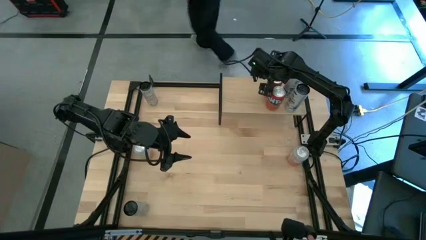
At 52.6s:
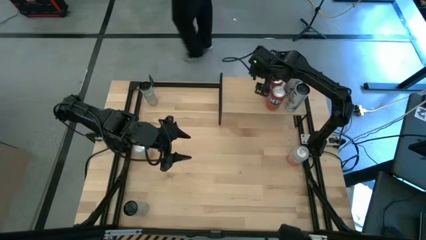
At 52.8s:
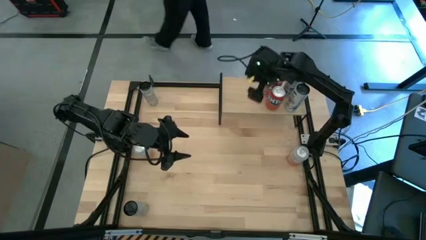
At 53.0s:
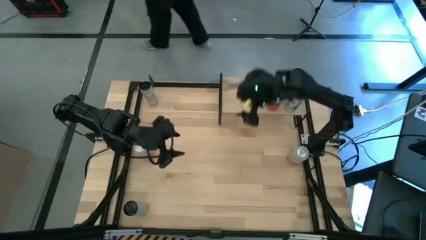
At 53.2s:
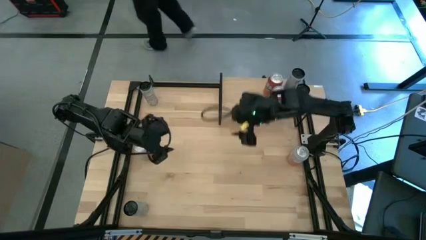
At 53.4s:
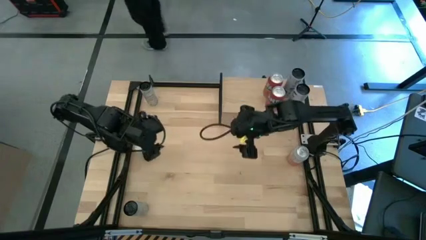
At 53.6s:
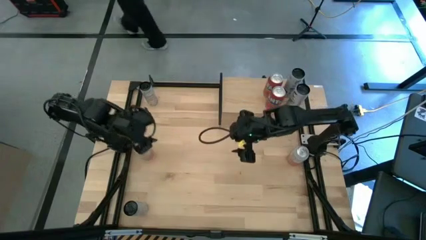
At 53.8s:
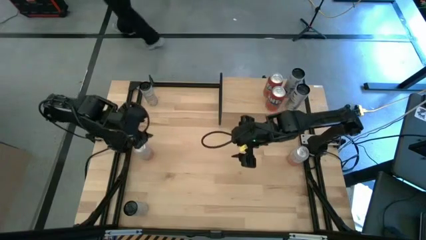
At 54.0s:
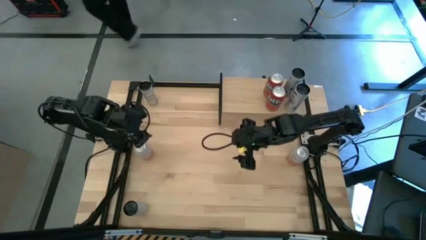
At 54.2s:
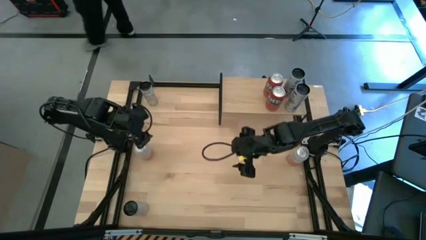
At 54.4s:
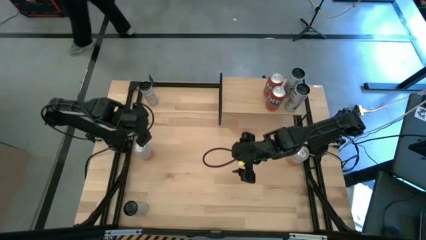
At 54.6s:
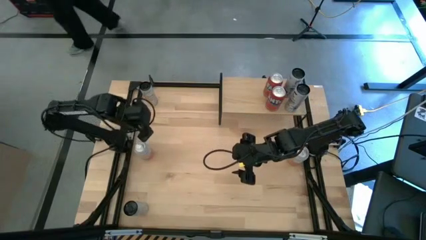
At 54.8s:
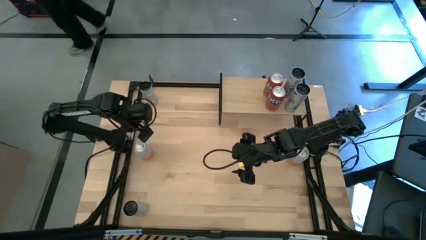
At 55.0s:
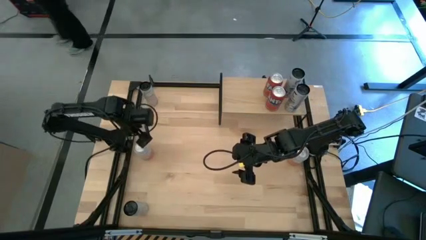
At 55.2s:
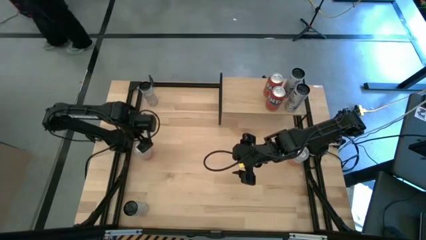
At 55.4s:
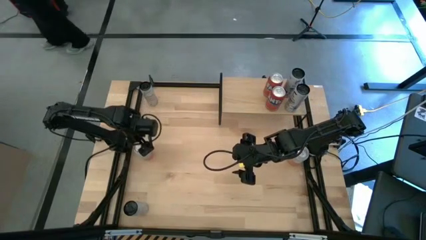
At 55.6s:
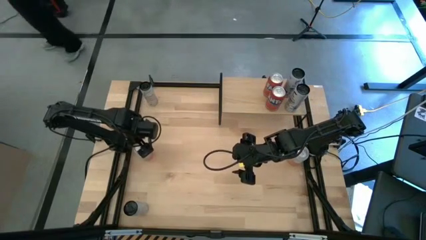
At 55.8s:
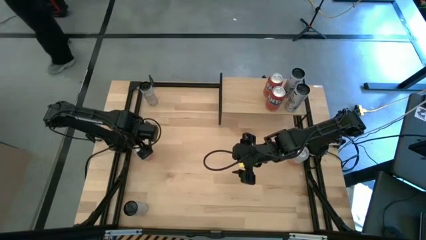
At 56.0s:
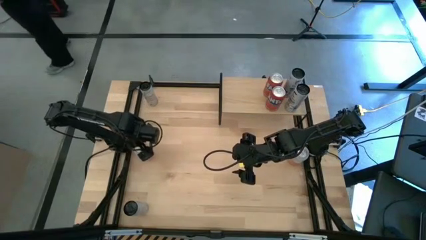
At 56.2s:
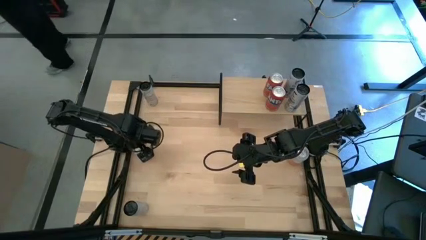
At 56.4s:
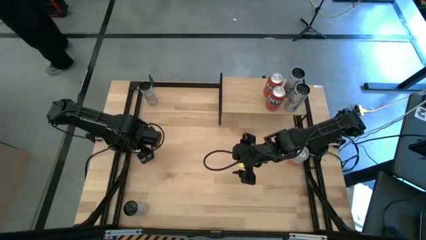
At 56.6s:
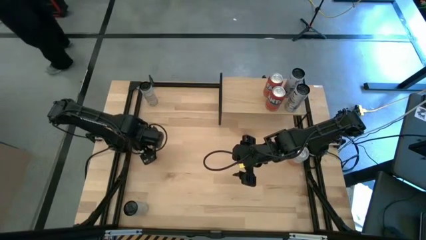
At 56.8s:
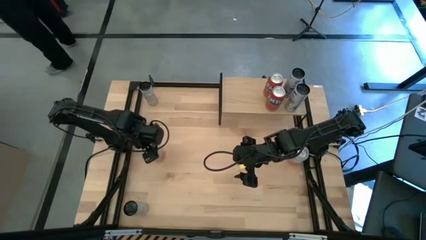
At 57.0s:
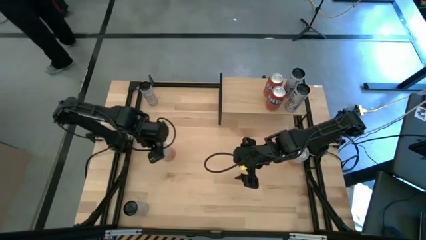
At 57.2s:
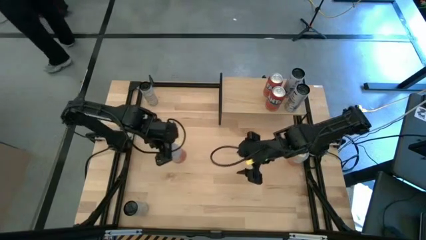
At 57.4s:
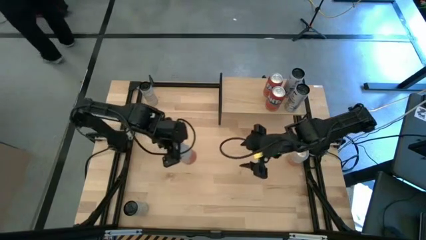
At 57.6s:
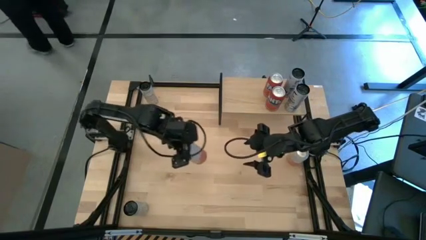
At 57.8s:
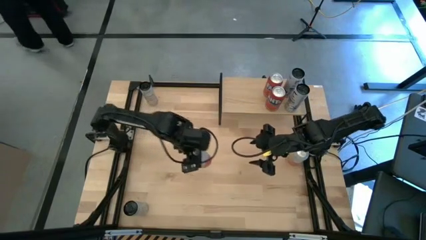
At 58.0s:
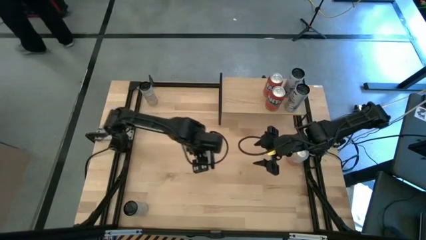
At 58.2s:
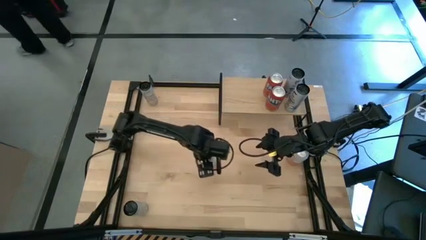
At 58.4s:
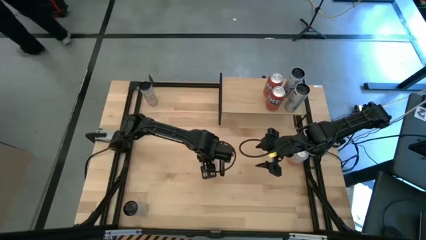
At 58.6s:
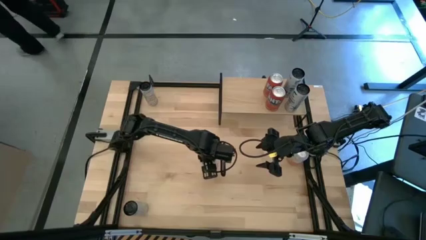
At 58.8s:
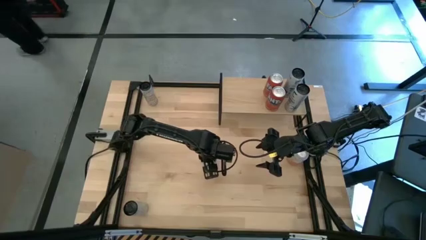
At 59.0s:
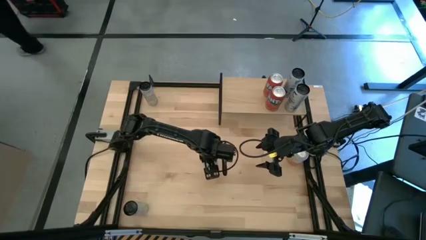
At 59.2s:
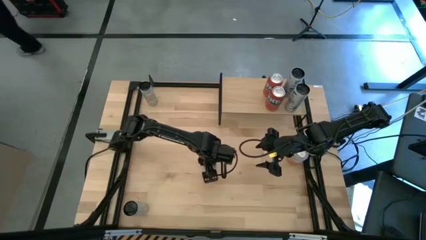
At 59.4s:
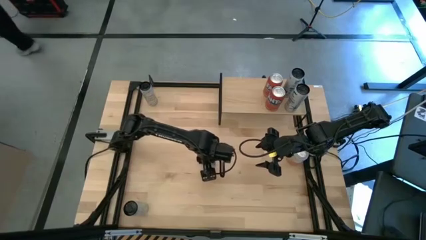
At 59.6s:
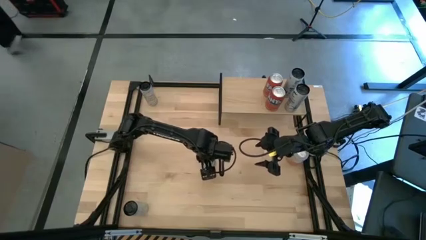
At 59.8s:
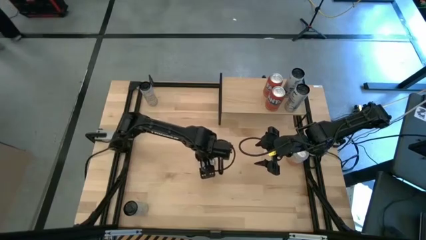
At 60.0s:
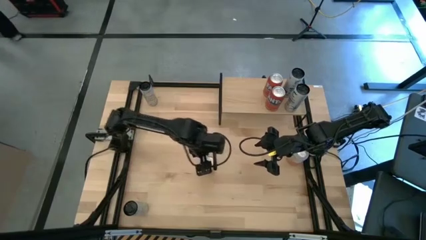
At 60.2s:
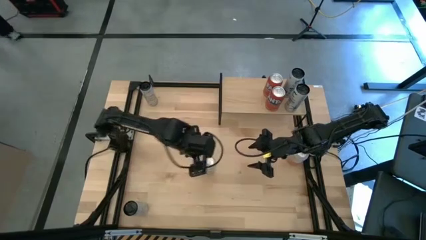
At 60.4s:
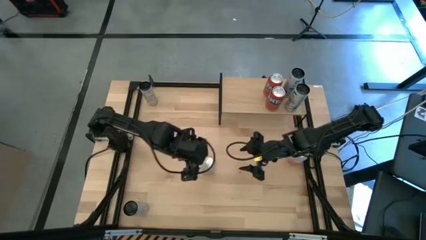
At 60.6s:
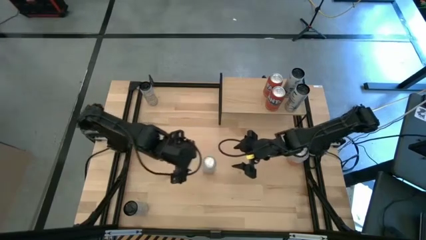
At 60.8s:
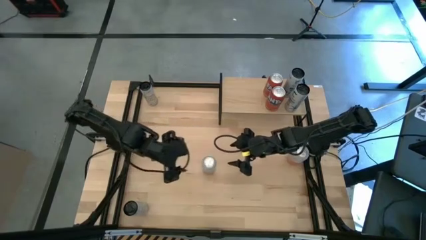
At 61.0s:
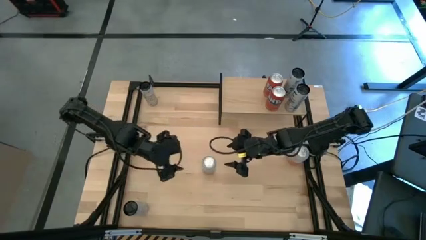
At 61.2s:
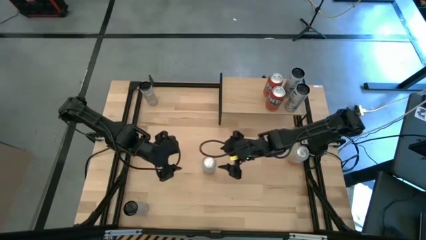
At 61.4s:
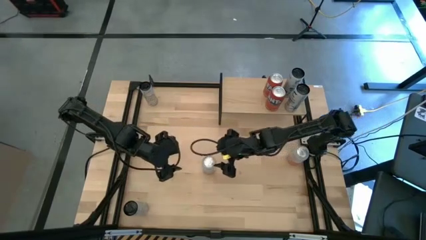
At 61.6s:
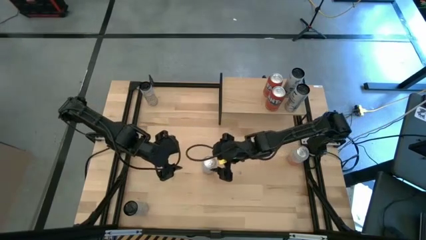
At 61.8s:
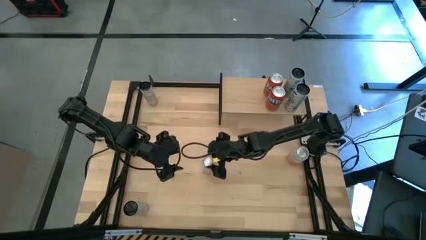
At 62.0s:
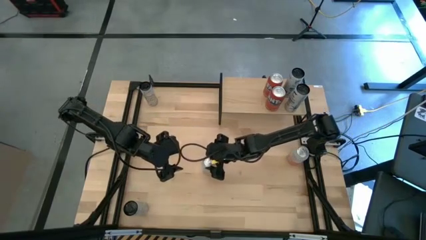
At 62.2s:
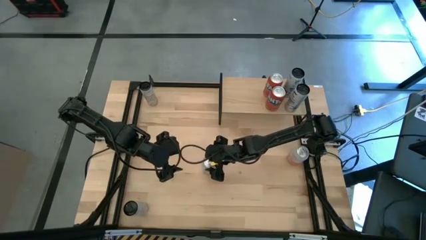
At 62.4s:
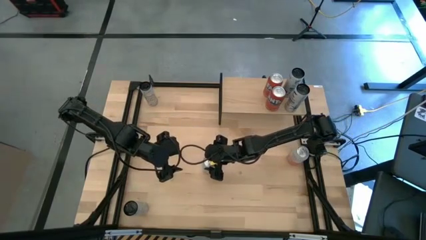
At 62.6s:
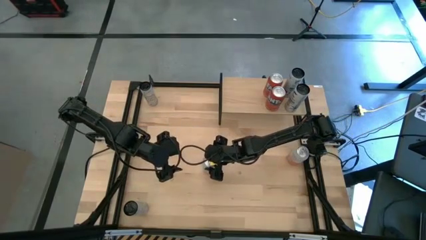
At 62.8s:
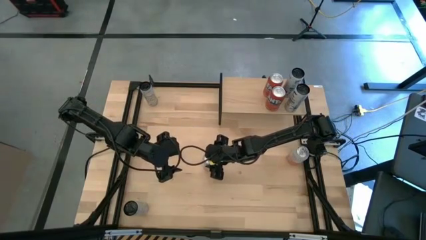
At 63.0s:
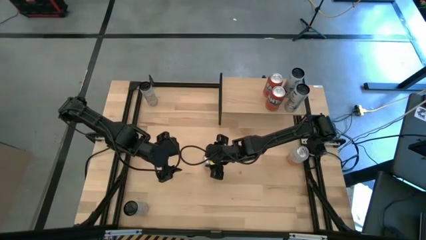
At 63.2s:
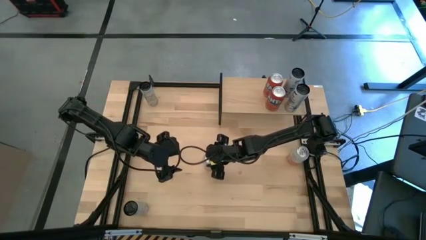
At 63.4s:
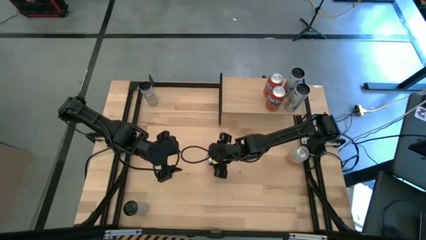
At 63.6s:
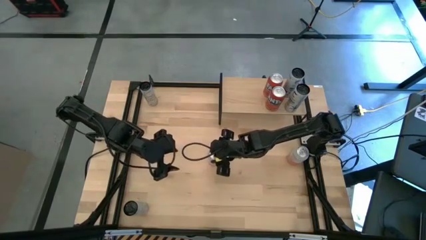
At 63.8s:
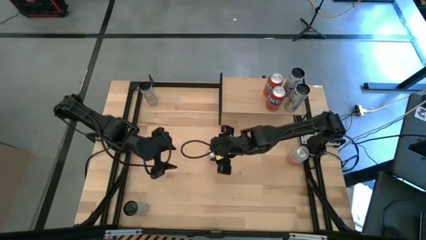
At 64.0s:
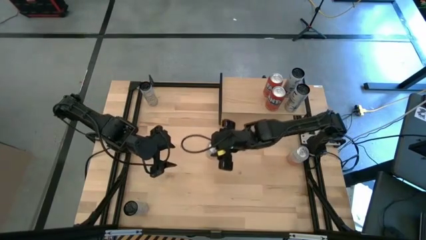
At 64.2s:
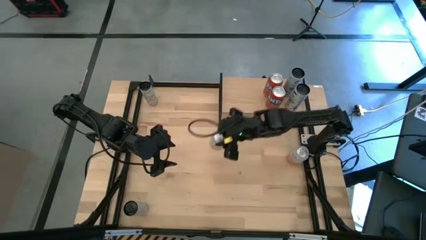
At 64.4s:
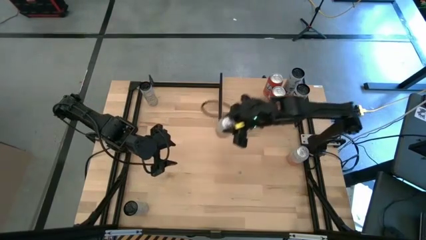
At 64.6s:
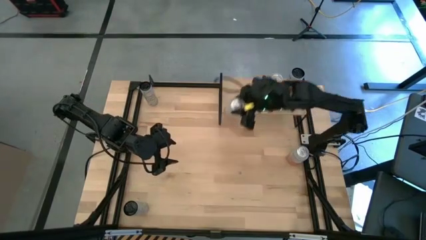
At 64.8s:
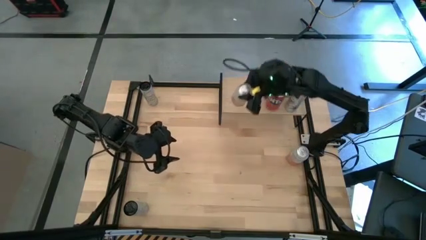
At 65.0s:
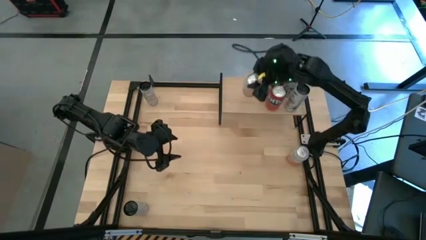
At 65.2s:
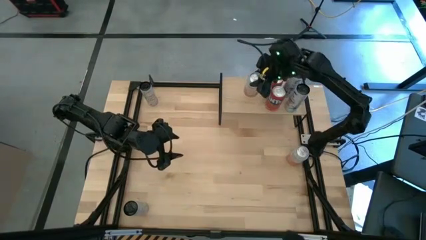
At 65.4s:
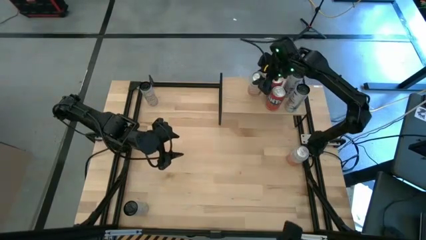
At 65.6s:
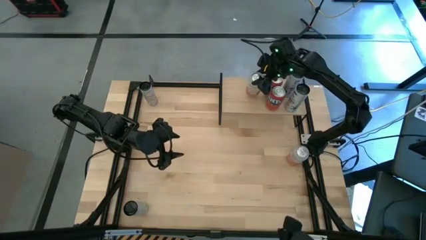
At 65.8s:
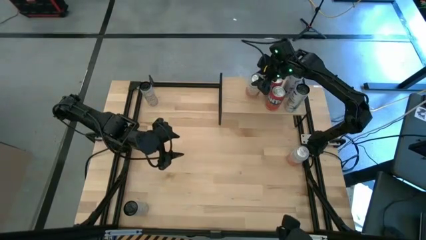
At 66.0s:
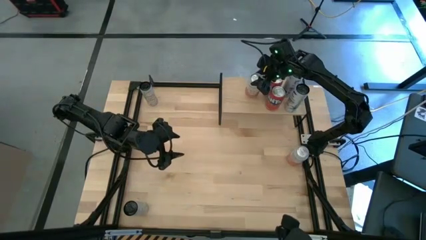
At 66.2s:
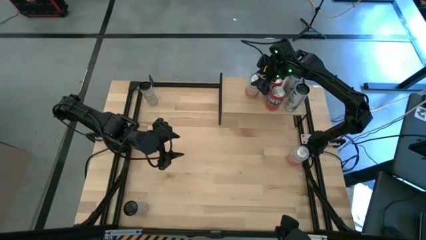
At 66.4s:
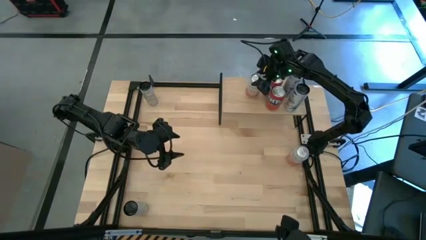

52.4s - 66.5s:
Task: Place canned beverage on shelf
Put the left white pink soda can on the shelf

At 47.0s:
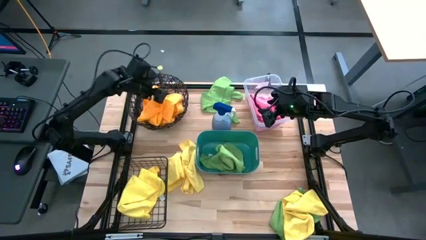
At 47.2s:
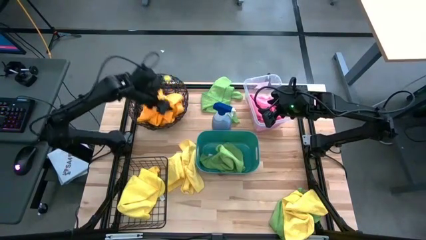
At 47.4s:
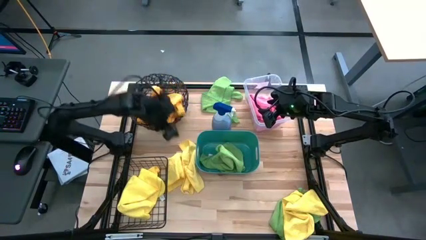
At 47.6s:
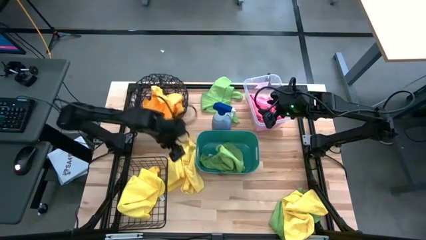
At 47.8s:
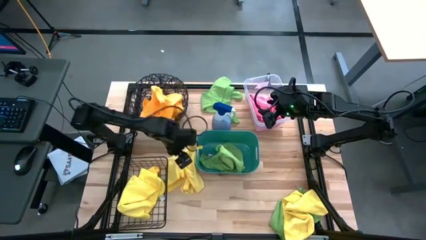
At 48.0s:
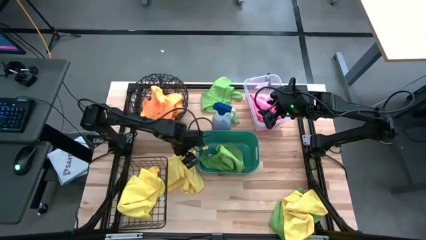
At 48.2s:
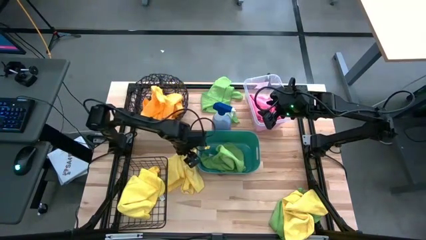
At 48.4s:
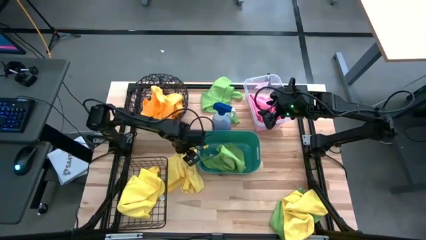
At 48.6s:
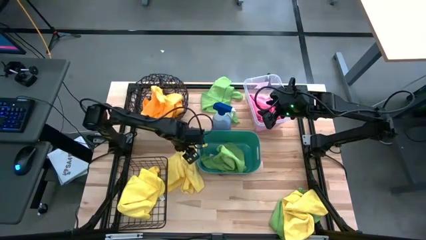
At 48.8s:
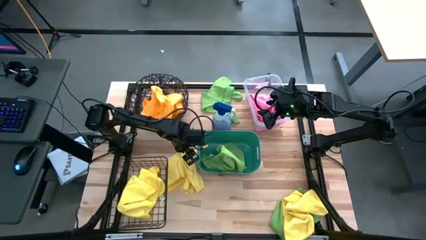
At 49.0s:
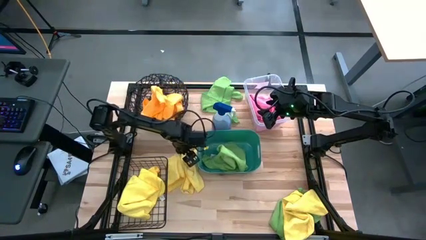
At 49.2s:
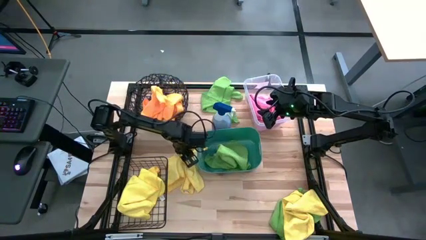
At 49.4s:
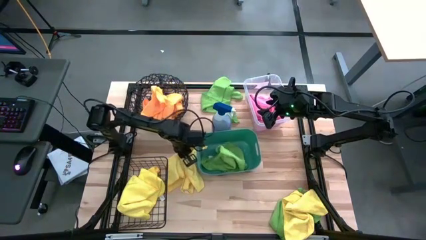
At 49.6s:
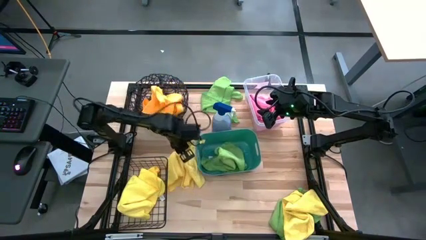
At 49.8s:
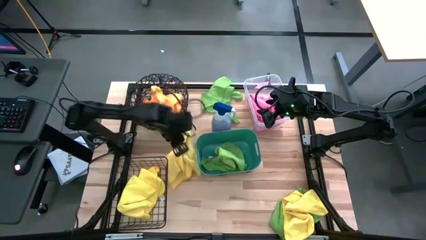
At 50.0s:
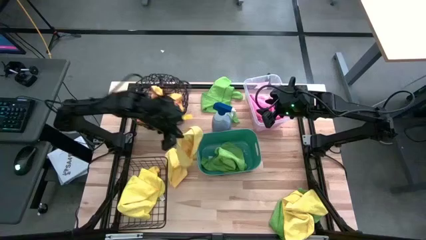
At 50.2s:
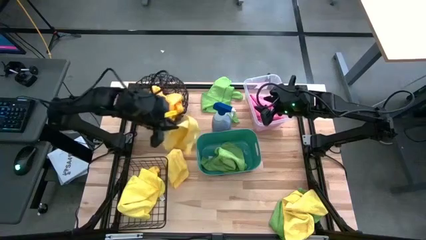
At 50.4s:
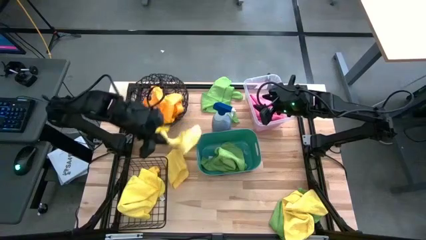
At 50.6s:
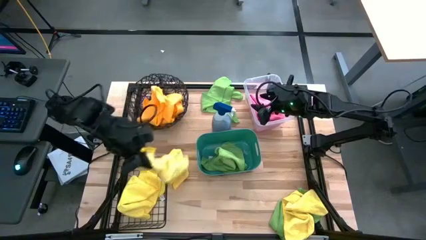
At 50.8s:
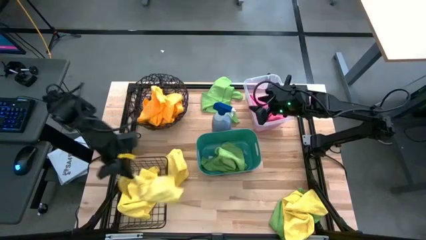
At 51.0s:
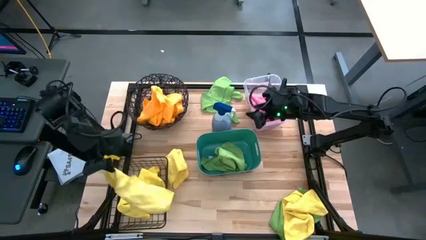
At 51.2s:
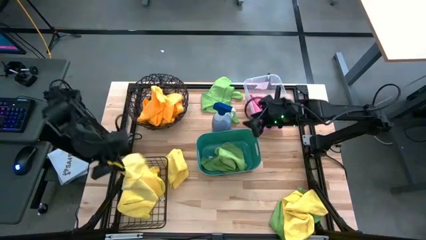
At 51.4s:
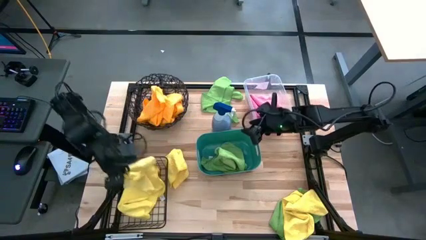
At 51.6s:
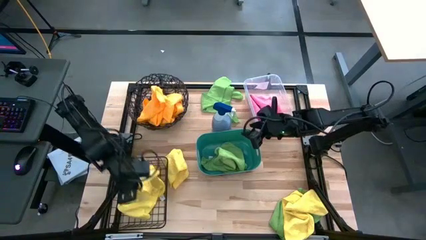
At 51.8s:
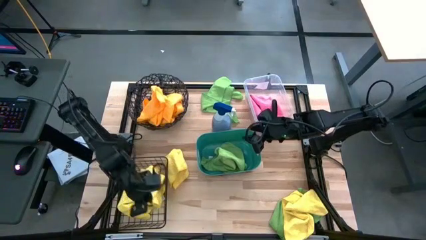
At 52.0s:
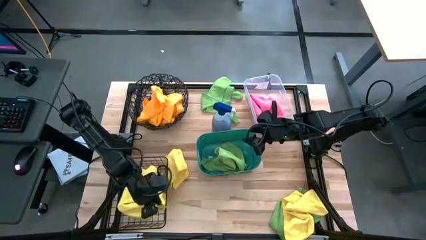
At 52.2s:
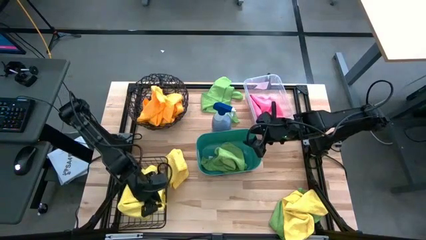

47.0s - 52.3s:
Task: Sort microfiber towel by color & place in baskets
Put the yellow towel into the wire basket
